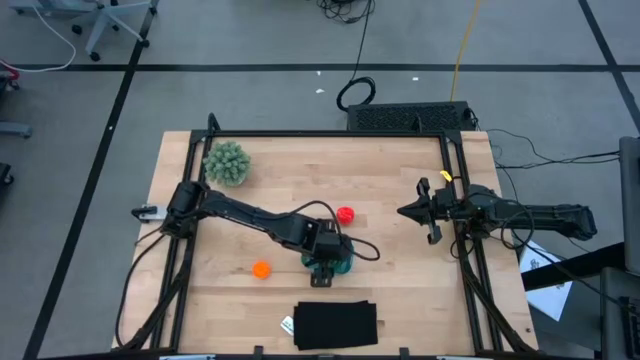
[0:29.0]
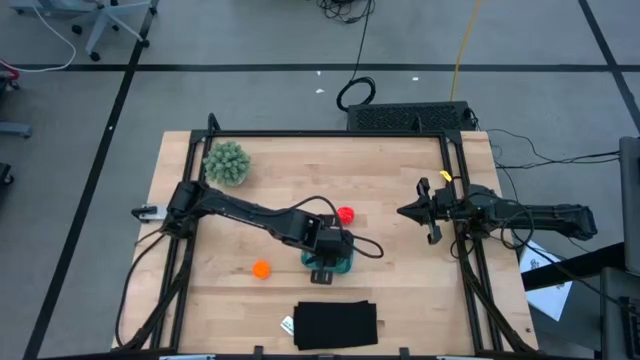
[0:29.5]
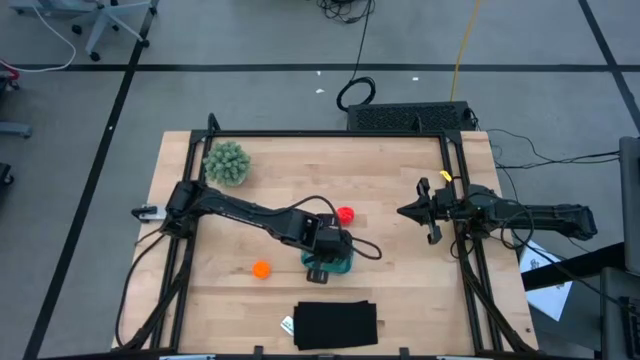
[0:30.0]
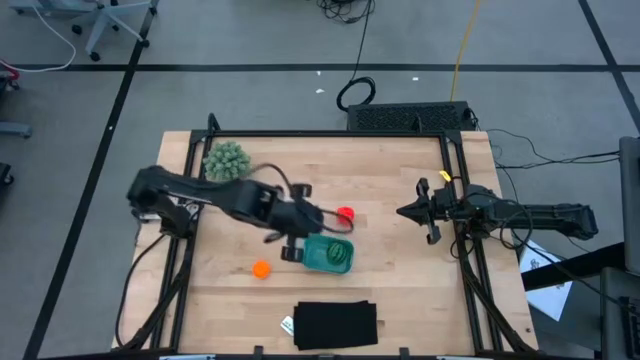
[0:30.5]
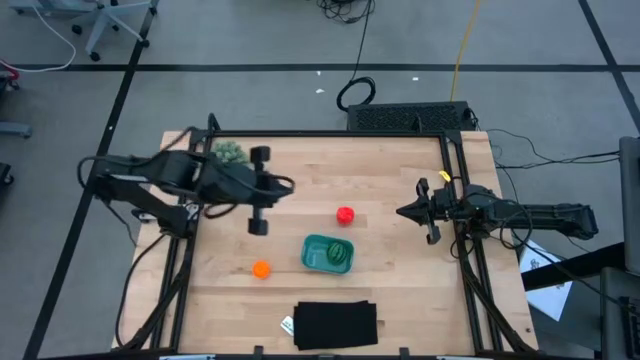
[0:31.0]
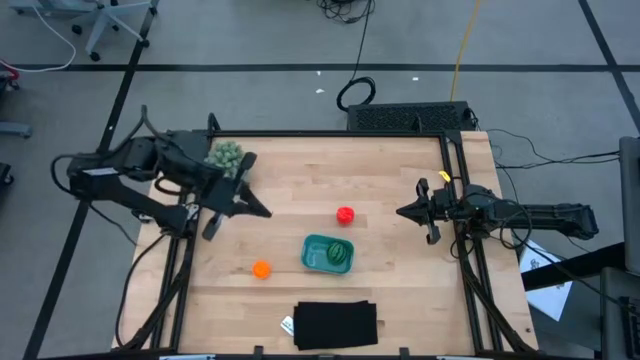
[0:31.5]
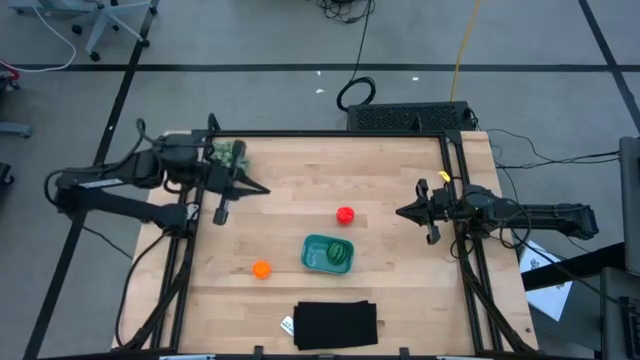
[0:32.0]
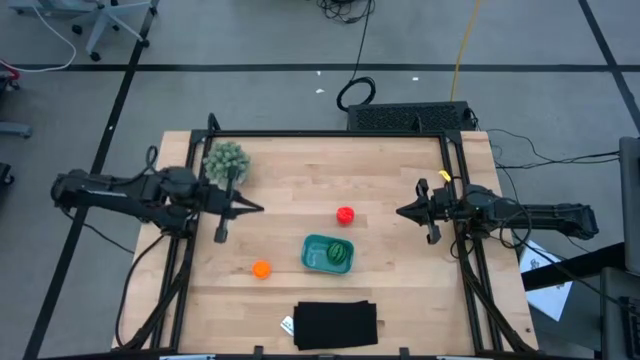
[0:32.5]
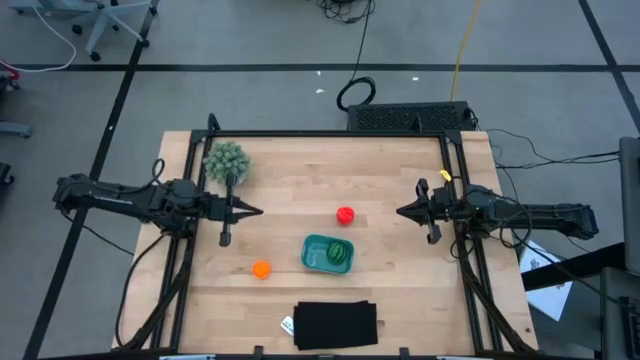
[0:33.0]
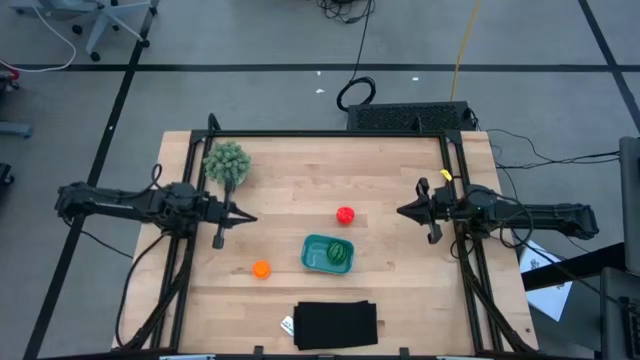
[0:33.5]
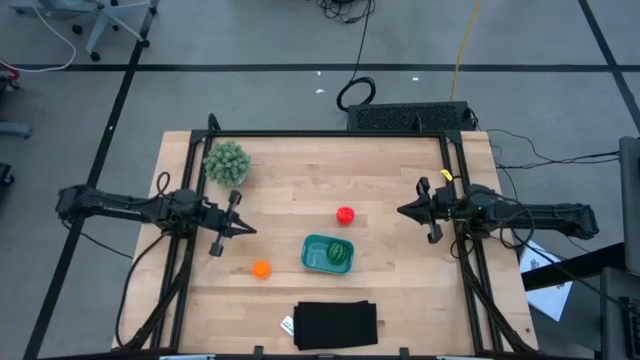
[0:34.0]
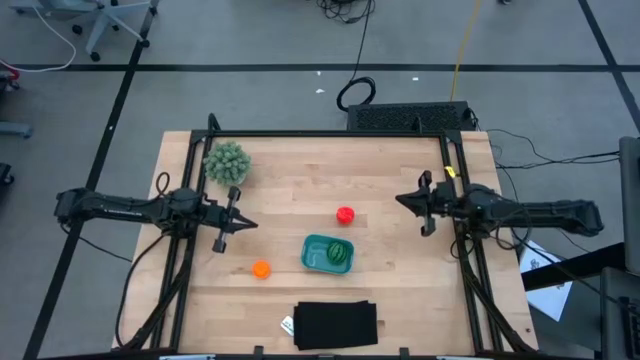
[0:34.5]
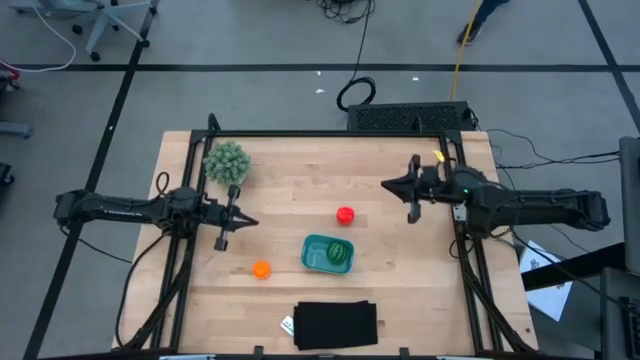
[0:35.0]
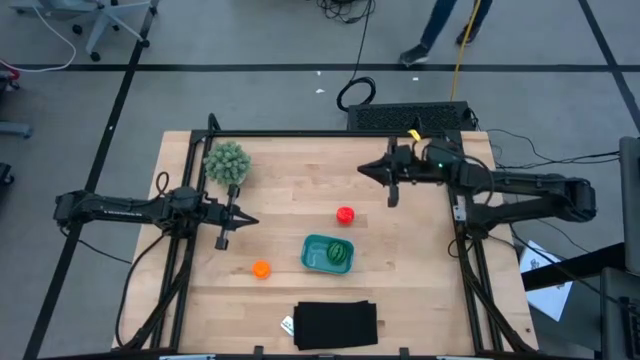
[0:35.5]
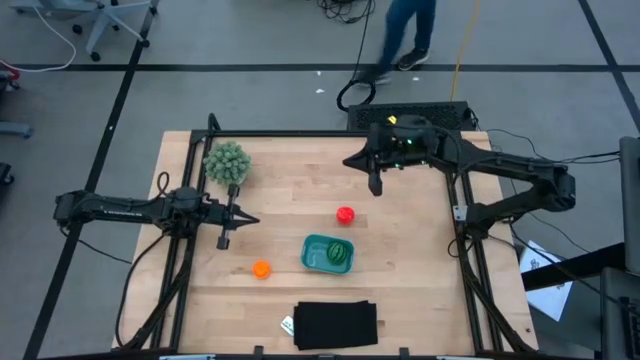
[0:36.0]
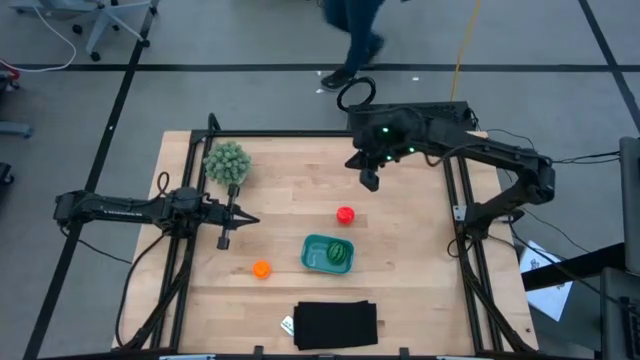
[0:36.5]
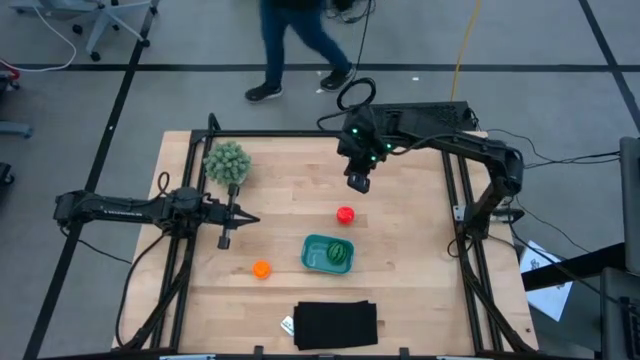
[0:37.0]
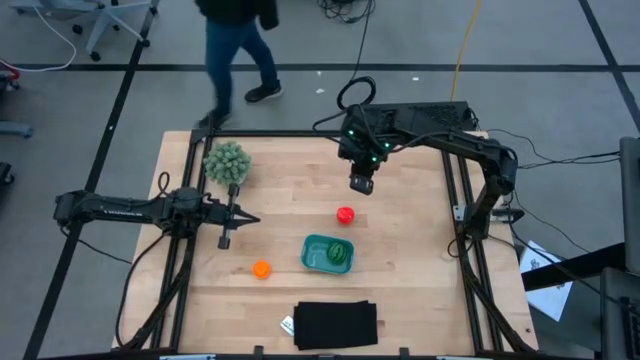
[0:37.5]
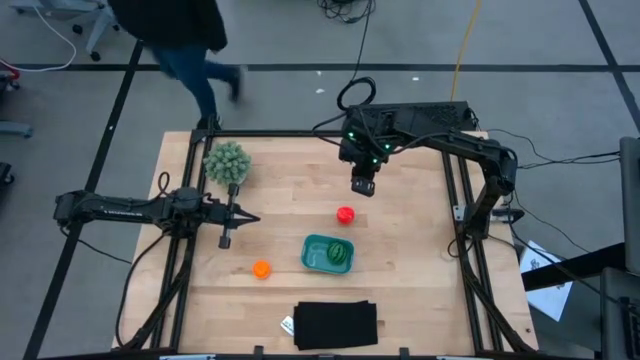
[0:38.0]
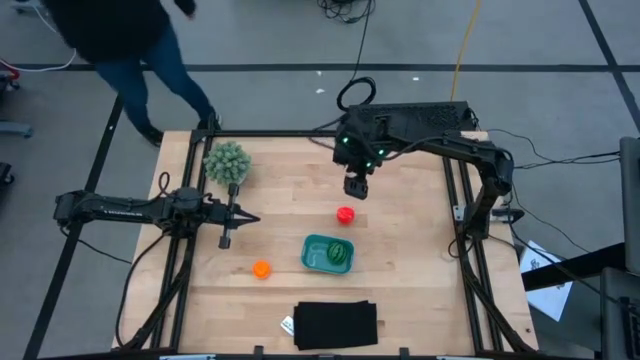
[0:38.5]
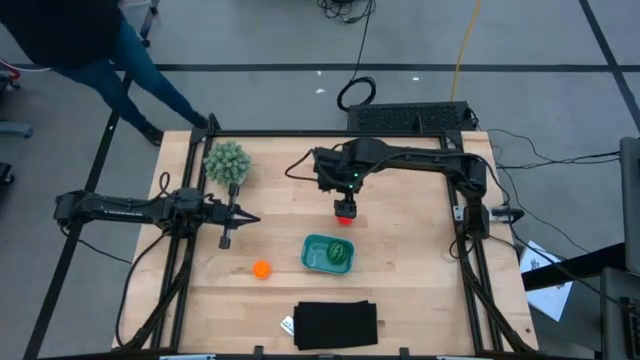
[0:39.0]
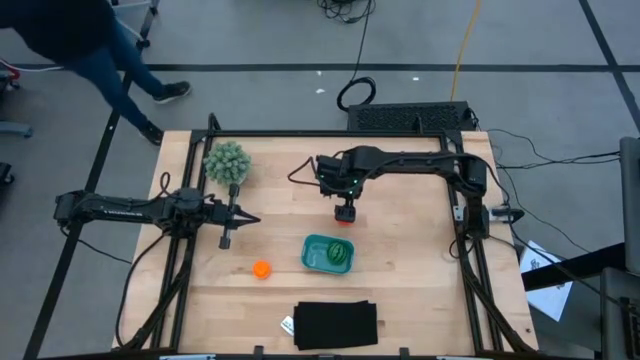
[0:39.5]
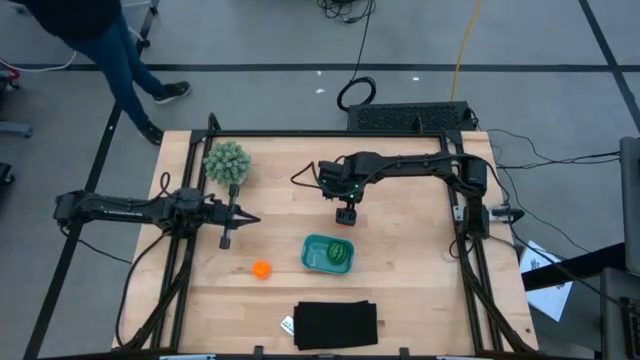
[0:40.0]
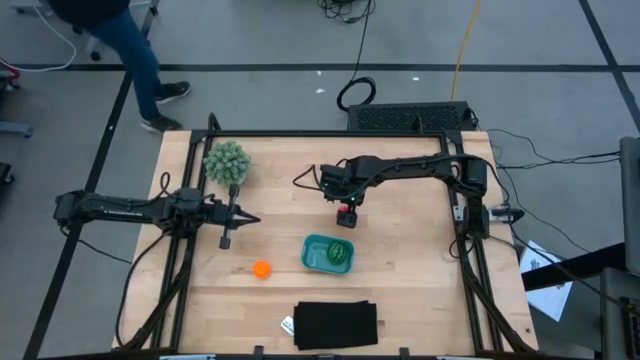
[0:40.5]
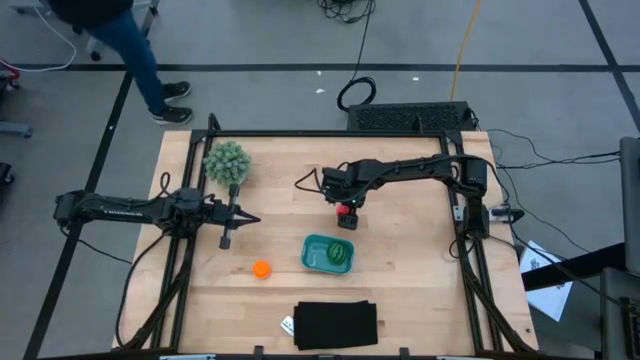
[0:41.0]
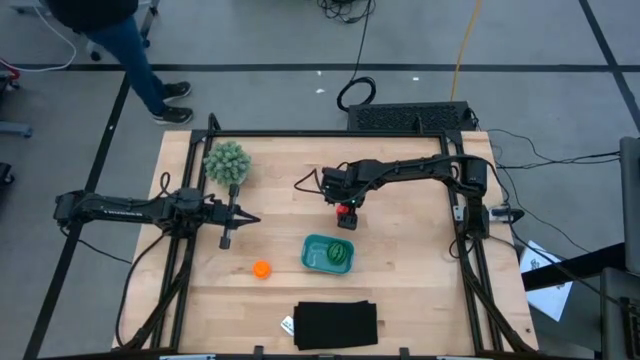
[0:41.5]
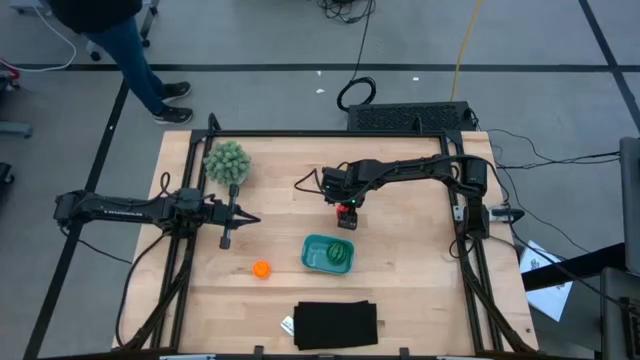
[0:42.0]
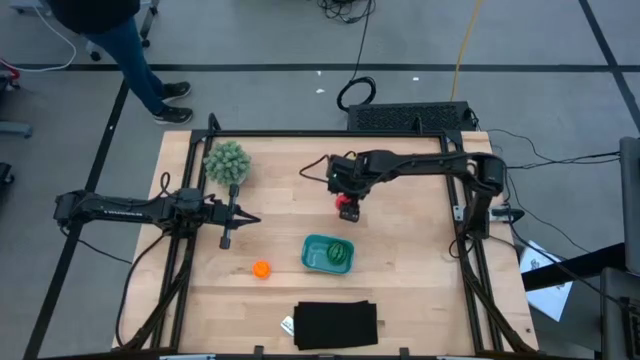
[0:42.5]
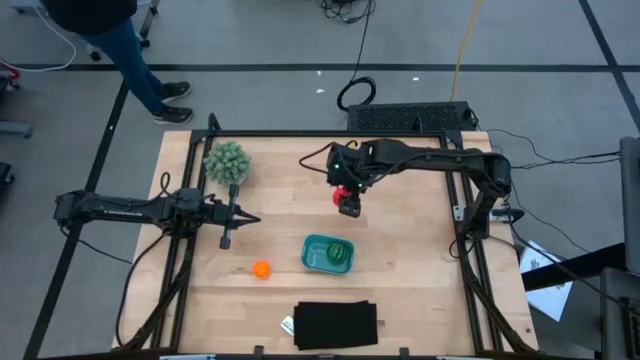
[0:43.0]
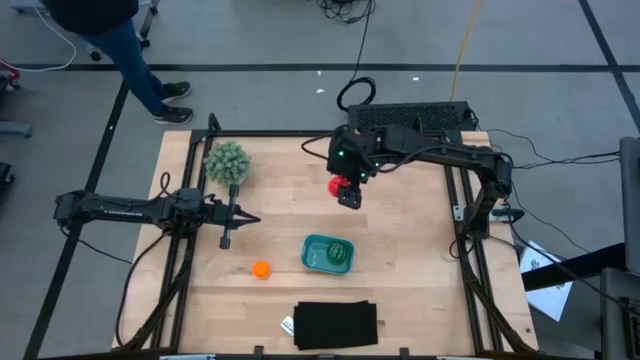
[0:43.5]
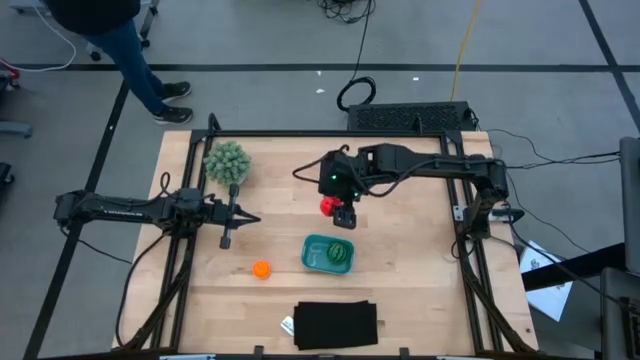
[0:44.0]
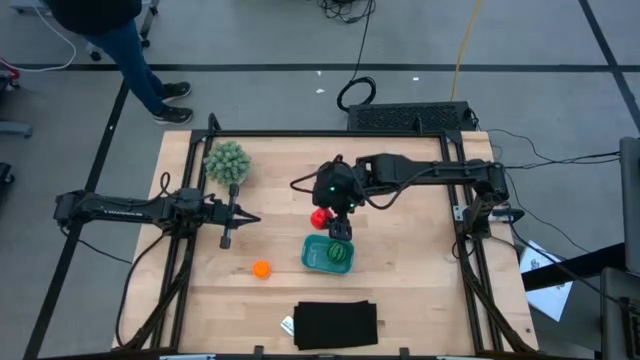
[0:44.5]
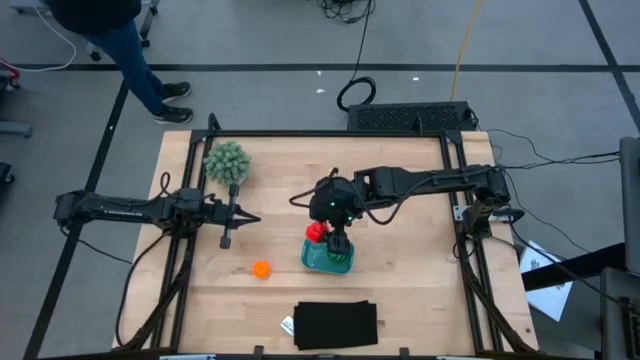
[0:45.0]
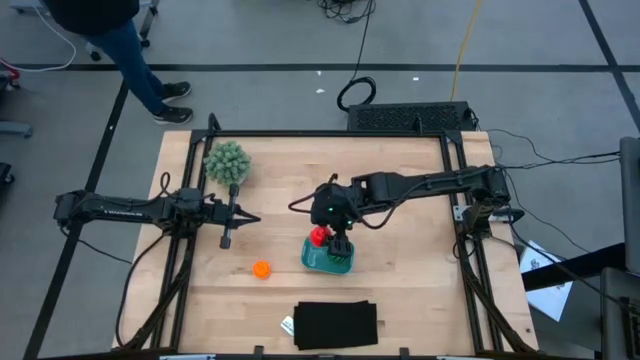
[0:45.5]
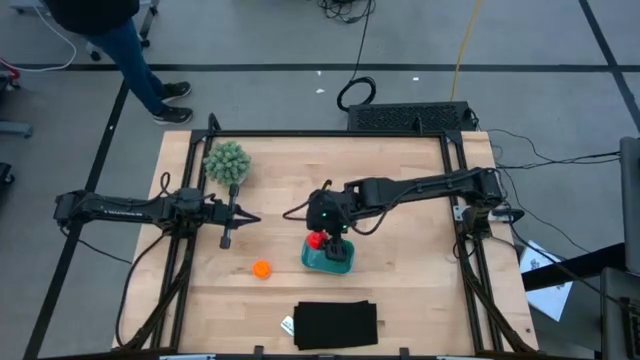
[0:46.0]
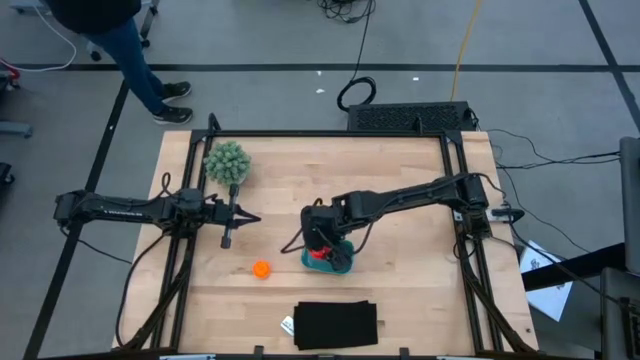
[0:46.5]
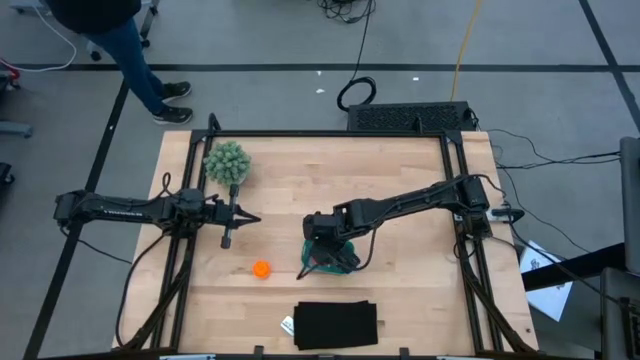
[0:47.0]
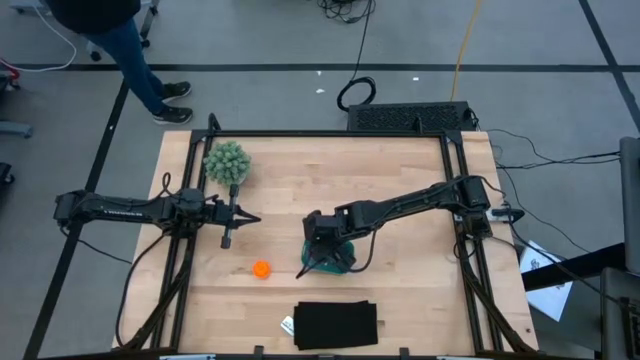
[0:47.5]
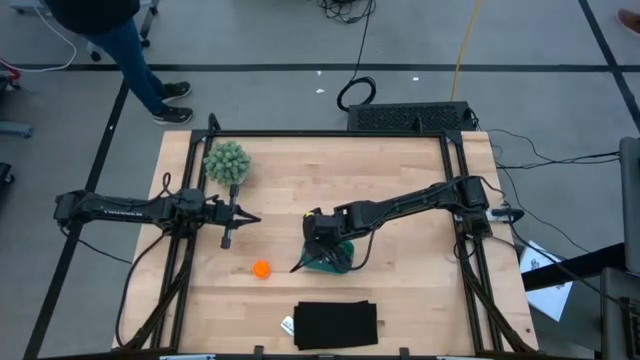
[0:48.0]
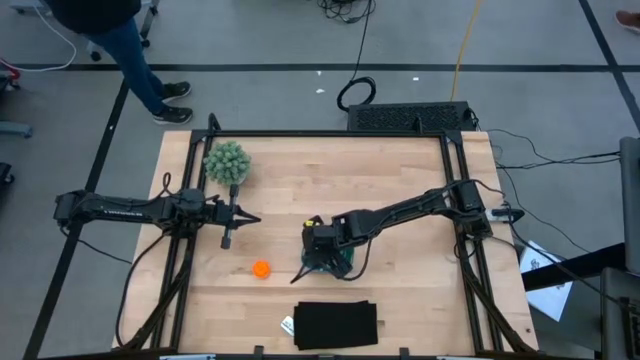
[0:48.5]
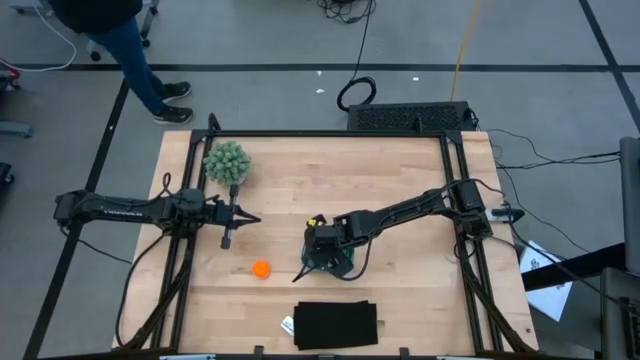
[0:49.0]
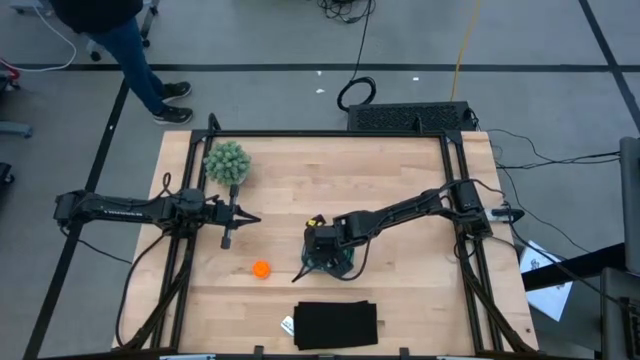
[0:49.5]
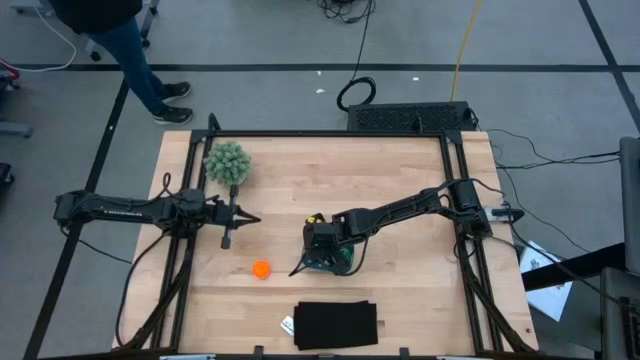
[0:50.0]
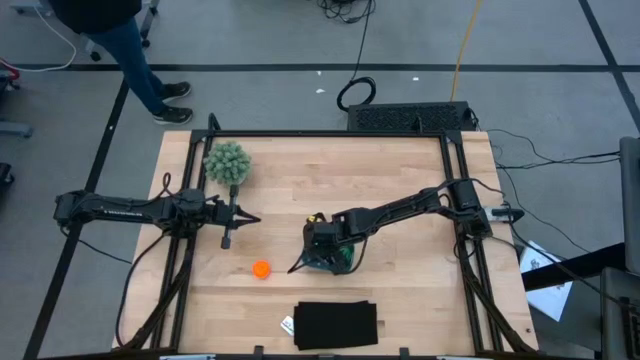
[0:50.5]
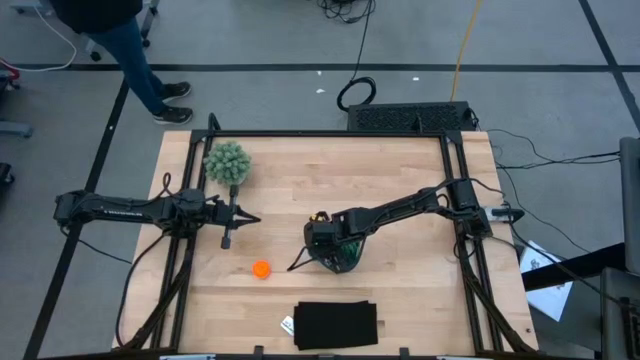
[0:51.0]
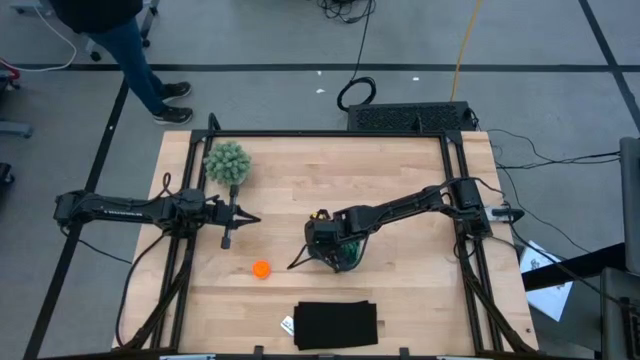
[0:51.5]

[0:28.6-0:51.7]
Task: Pick and placing Produce into tupperware
Put the apple into the bin
